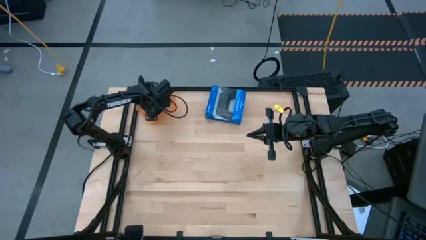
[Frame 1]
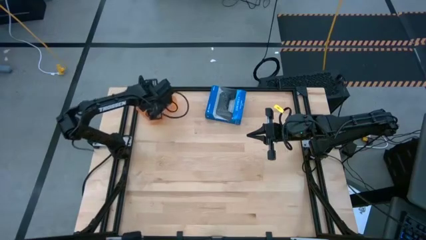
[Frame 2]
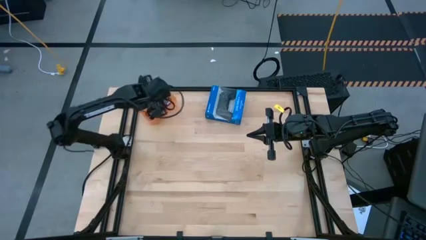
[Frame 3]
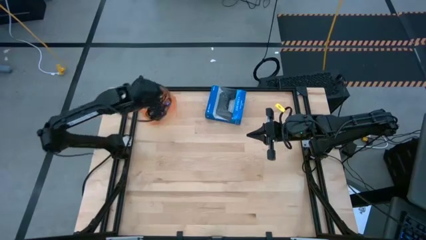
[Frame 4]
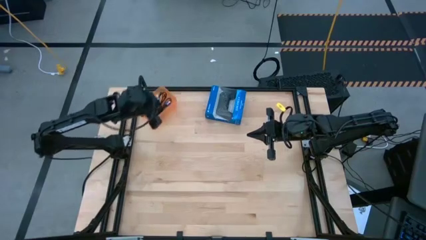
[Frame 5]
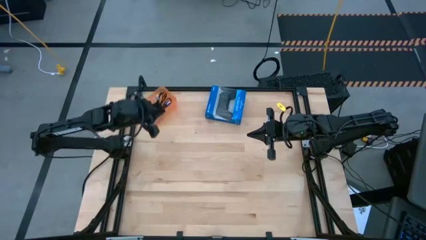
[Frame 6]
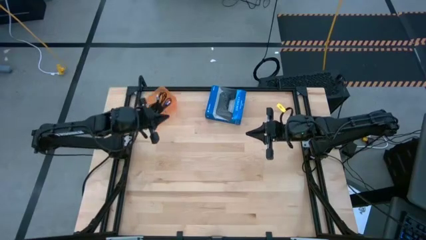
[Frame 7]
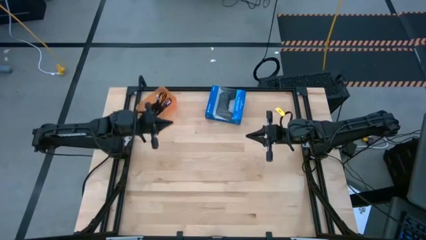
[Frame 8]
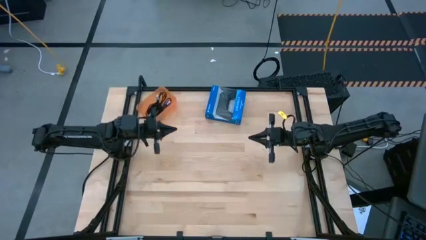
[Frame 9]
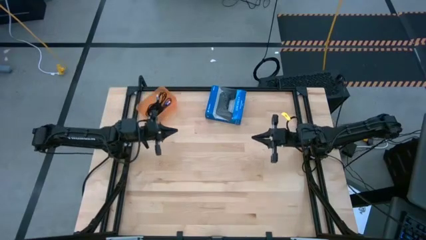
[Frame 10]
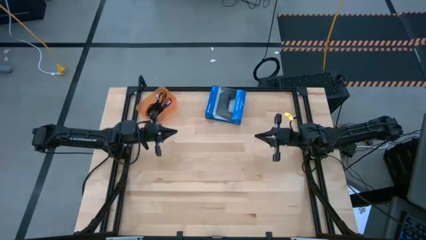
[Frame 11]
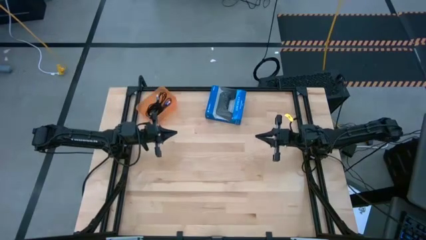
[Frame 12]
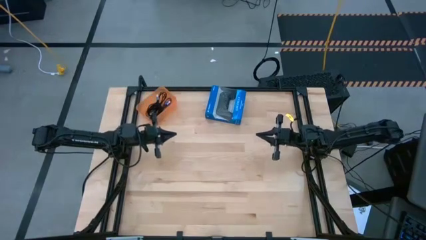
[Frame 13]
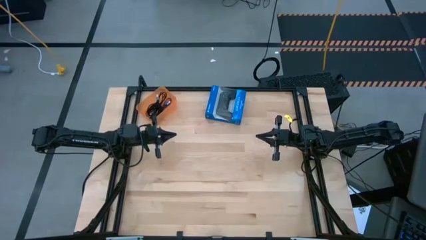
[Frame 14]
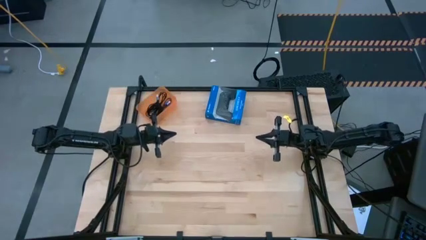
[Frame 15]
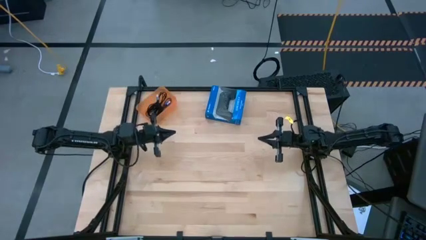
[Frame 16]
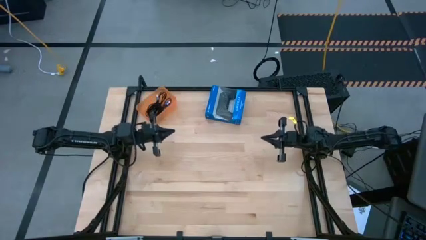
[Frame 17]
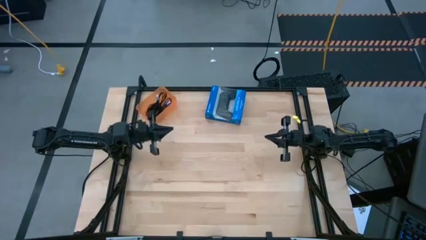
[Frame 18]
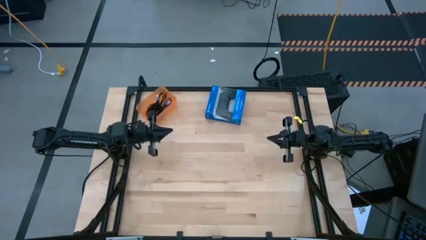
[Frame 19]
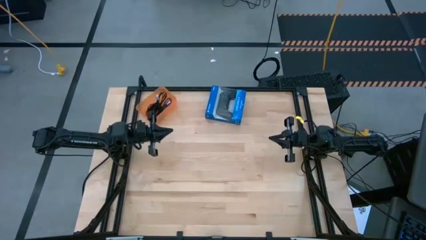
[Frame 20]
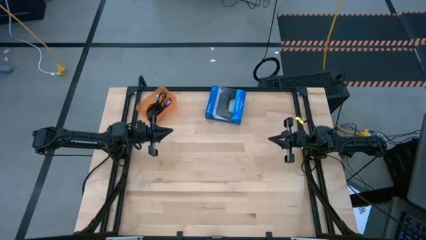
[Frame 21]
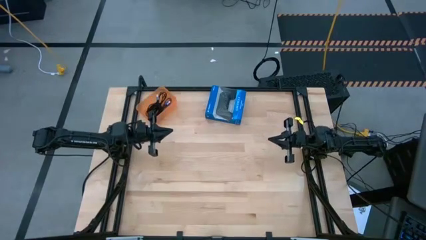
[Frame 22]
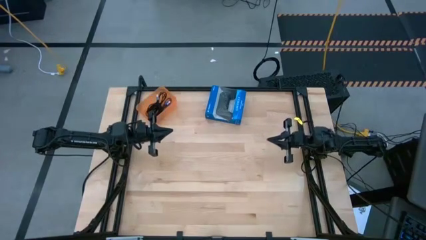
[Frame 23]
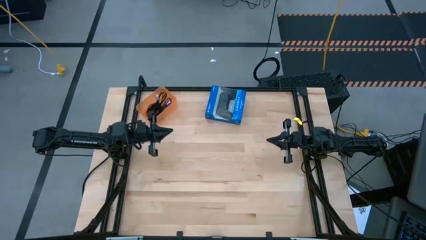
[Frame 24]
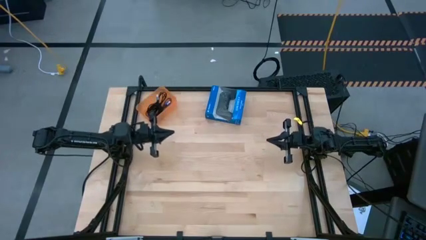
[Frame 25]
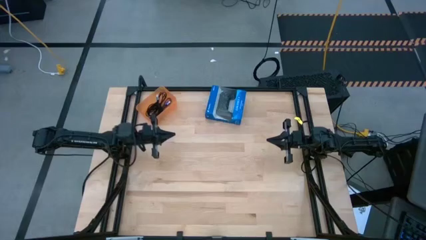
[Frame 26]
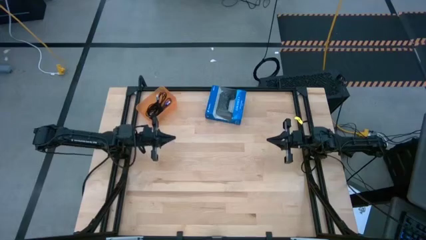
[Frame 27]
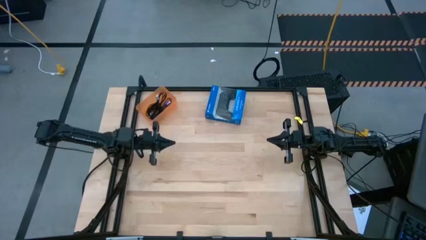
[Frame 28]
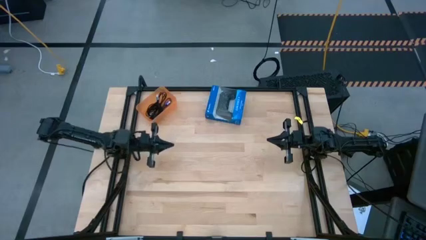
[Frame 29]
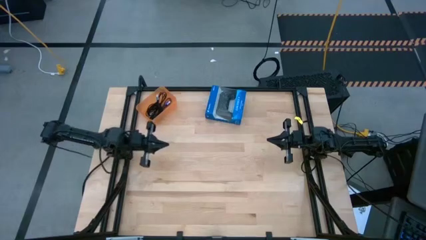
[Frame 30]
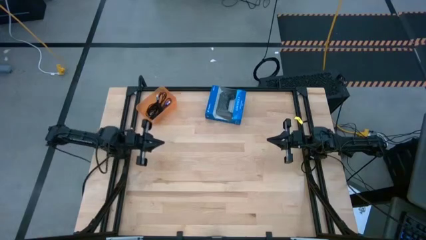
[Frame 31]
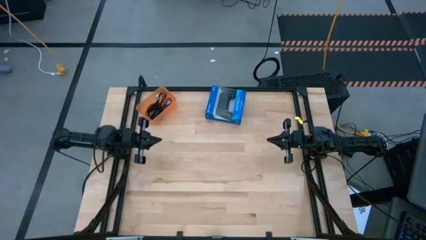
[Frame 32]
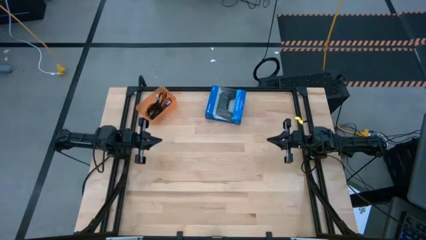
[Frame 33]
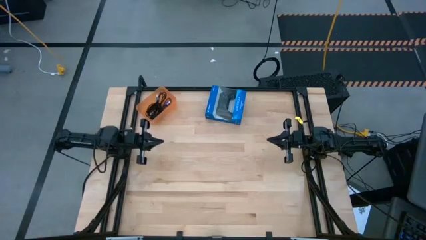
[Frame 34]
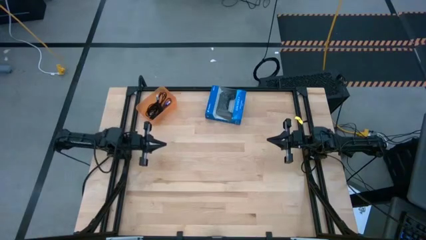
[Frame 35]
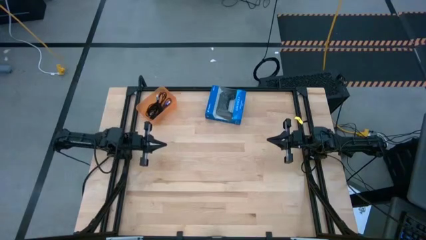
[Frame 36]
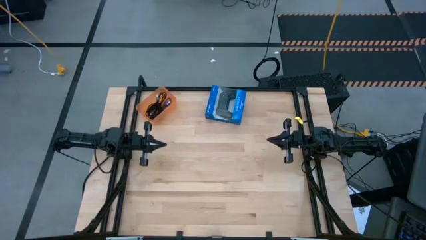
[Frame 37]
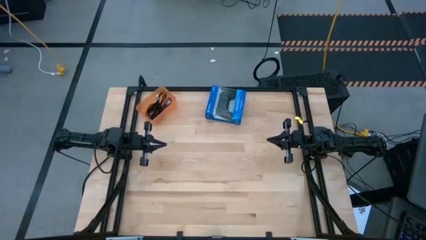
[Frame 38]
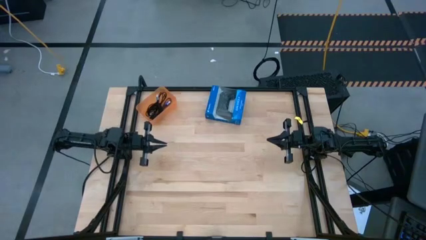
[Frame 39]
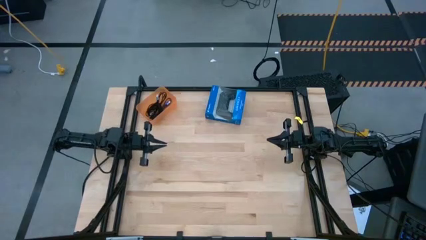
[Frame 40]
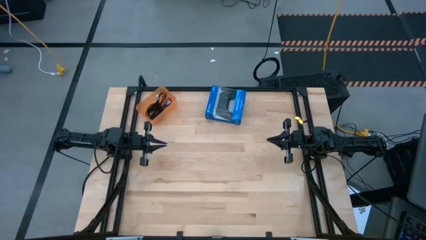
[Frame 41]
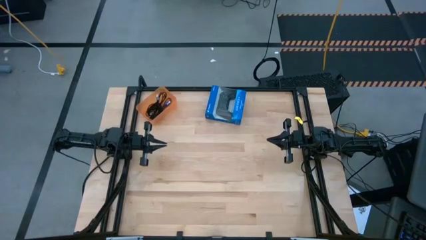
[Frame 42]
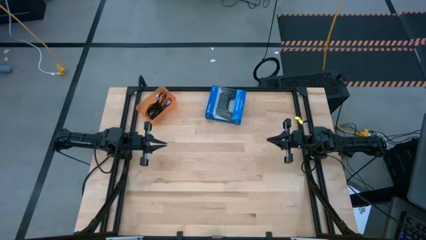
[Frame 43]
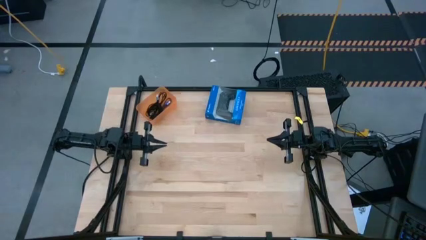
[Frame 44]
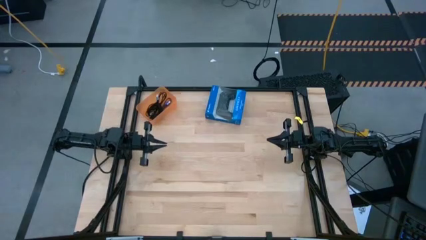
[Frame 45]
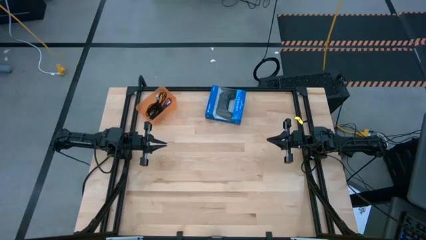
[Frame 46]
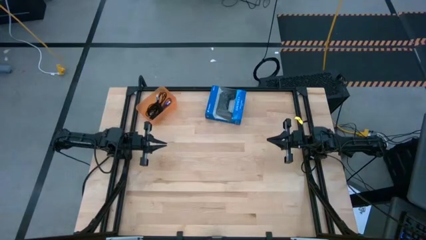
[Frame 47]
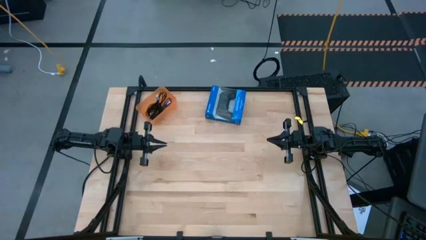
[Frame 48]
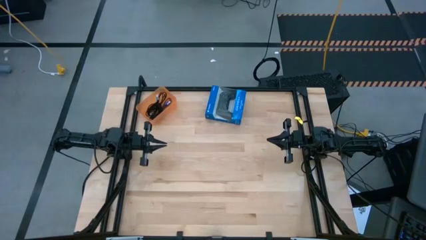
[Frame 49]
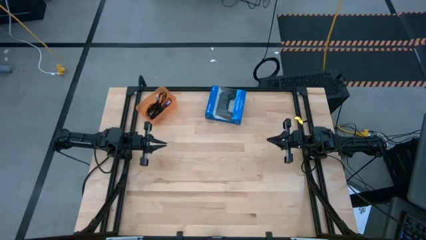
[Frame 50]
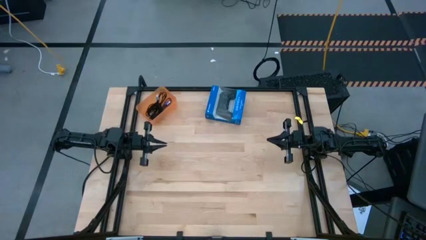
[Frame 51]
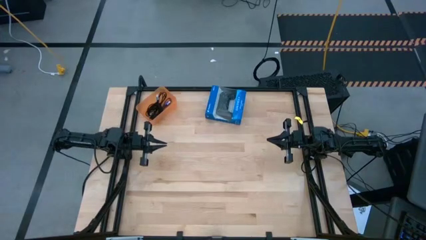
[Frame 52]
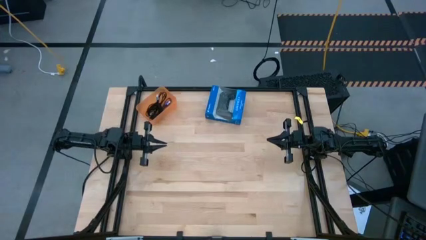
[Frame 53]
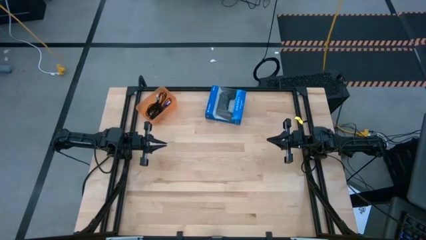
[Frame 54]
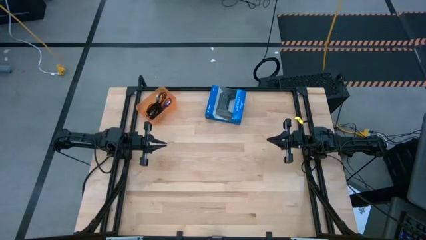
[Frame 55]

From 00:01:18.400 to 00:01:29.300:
Task: Pick and place USB-C Cables
Return to Home Position

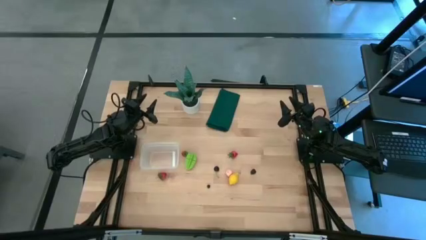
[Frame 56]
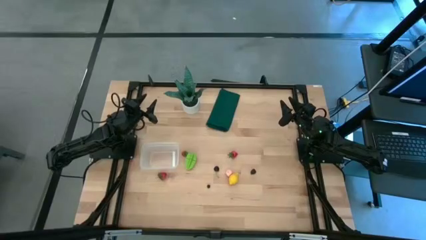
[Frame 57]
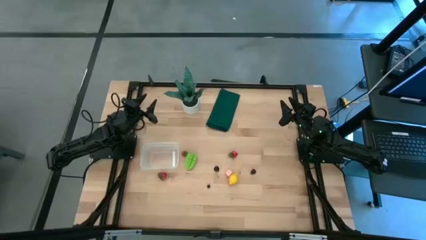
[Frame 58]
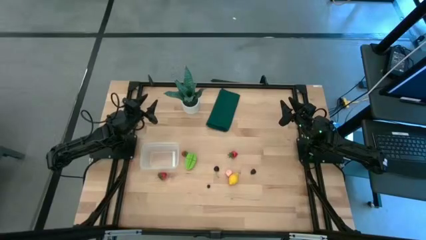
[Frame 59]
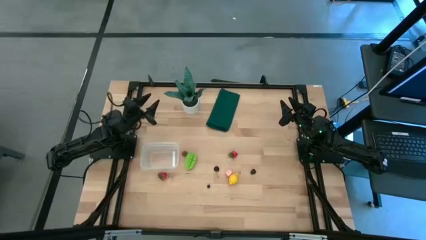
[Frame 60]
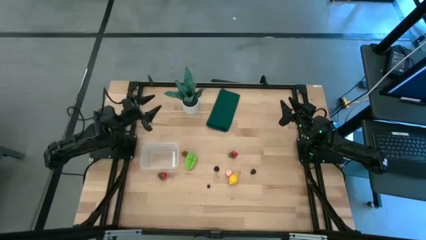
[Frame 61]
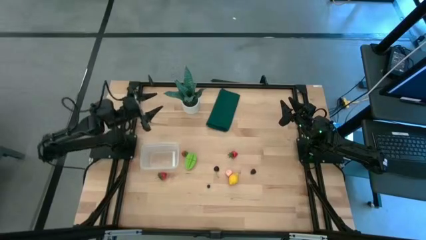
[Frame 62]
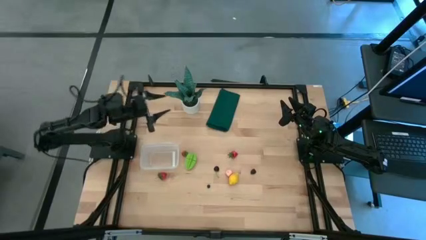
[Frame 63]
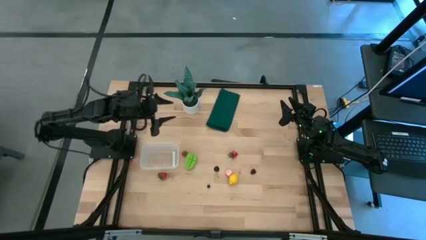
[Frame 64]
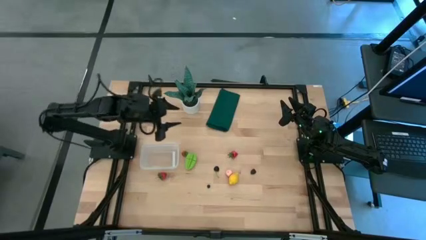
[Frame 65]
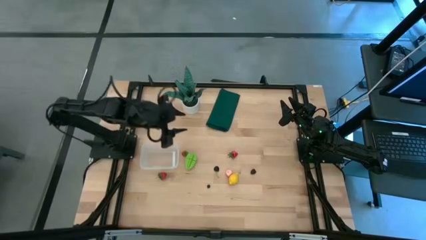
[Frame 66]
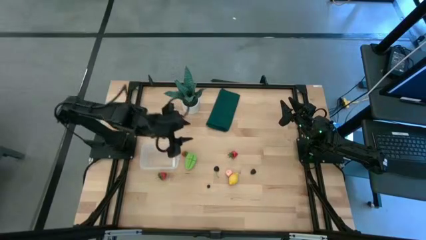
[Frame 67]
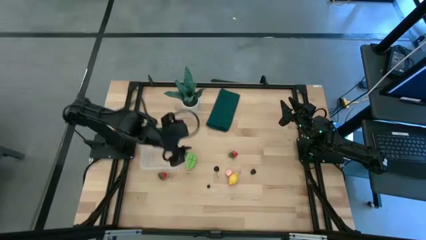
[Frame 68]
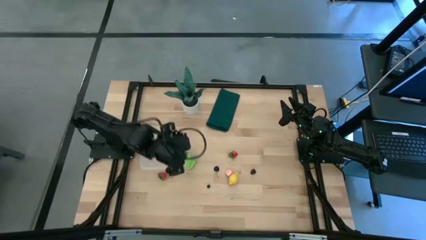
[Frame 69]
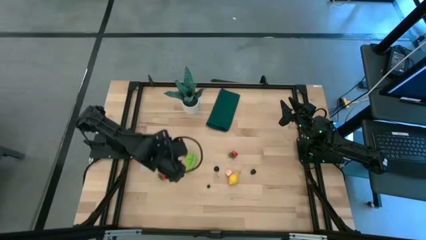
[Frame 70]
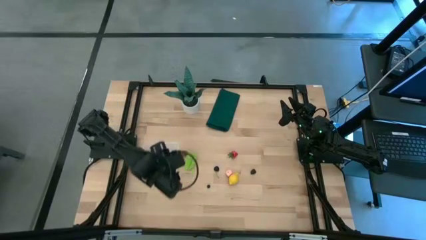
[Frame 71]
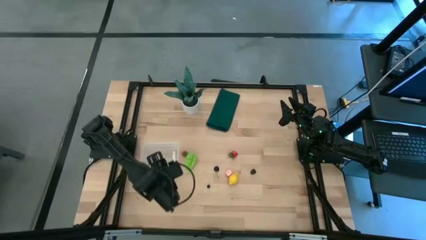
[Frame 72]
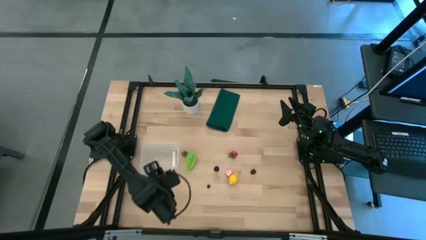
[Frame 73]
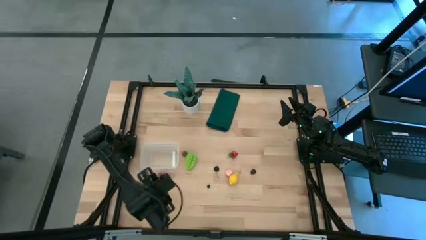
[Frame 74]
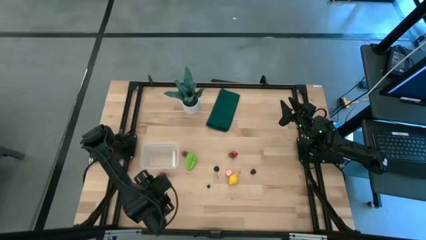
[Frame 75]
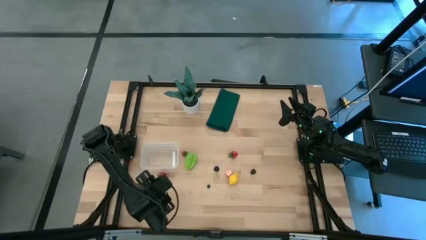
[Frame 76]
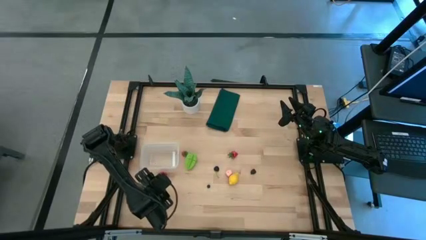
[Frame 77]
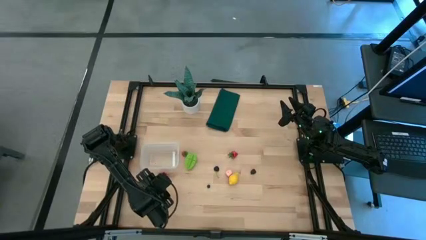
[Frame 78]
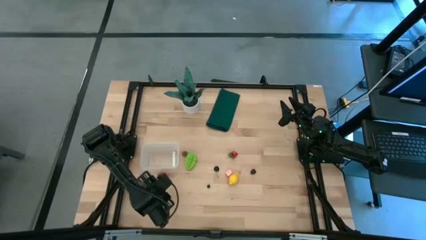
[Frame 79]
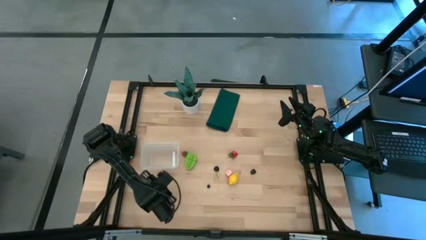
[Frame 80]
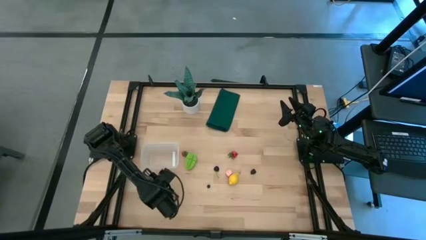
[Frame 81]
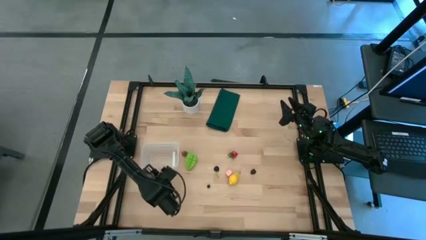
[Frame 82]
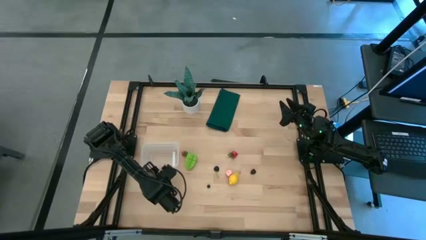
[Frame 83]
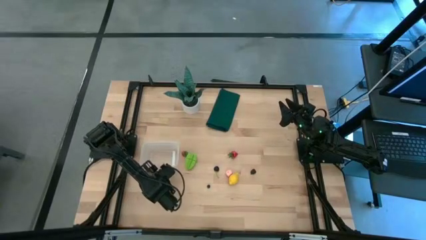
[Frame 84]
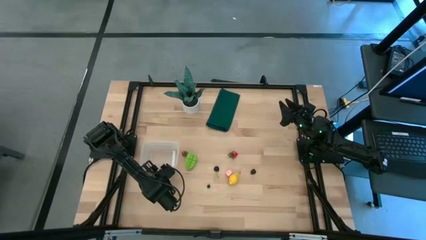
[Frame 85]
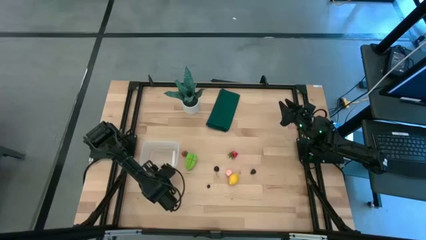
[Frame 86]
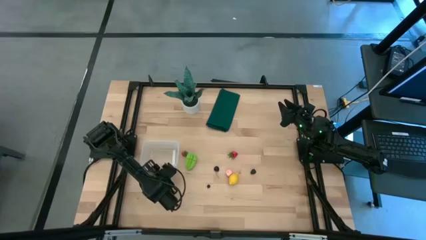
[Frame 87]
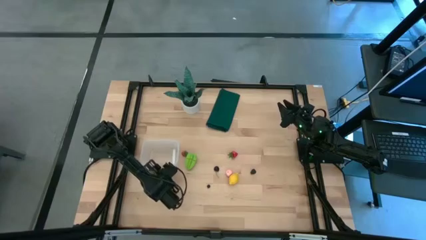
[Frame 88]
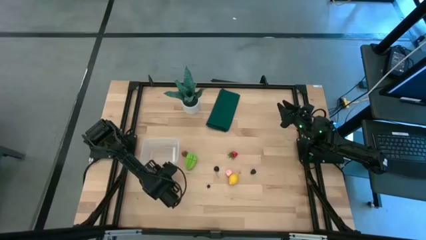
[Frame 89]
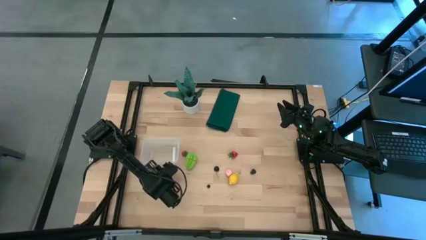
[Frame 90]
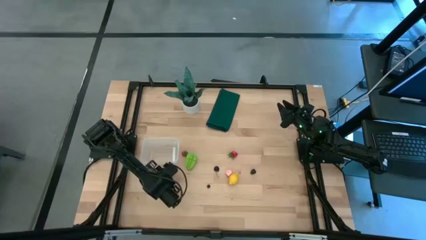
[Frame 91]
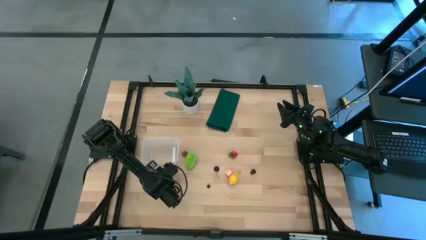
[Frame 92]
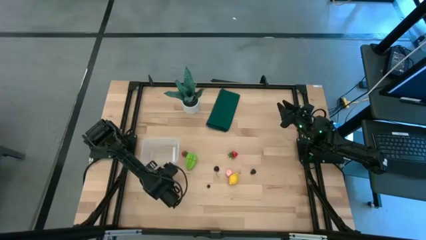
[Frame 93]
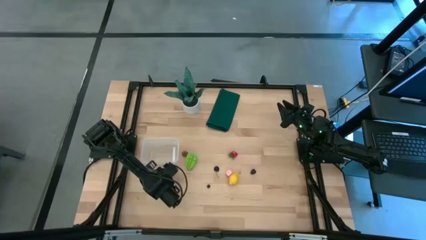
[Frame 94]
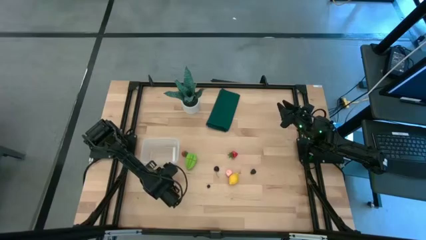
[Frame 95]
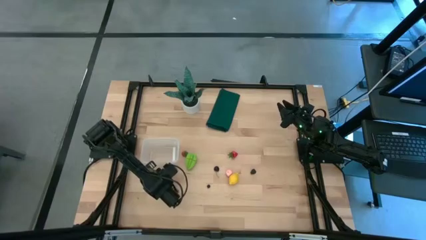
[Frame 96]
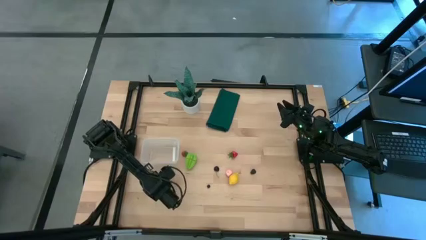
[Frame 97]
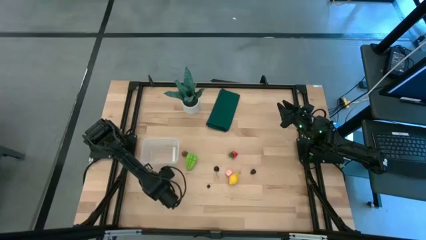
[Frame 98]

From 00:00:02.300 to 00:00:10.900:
Task: Pick and placing Produce into tupperware
Put the bottom strawberry into the transparent bin
